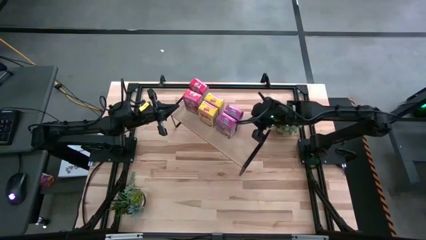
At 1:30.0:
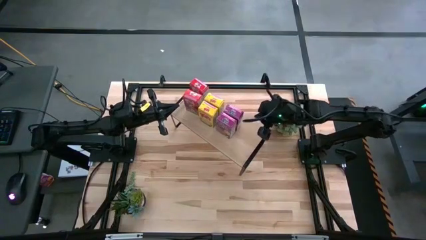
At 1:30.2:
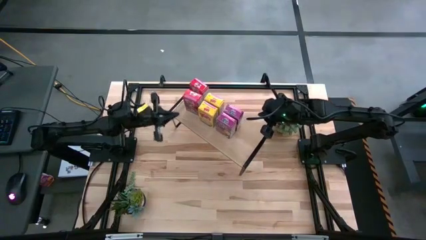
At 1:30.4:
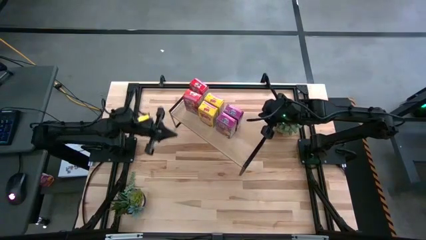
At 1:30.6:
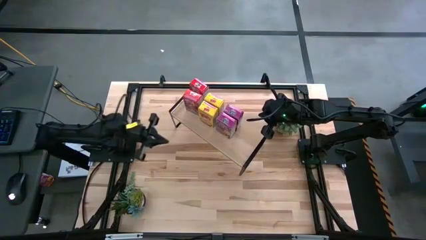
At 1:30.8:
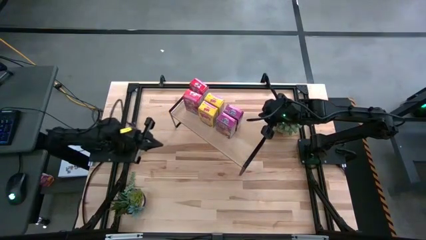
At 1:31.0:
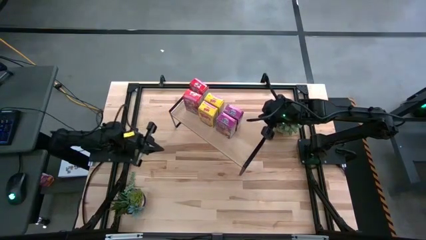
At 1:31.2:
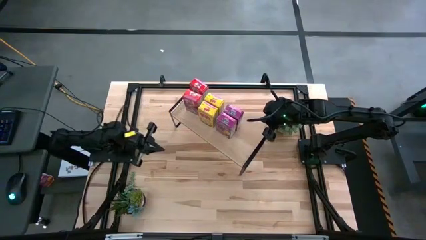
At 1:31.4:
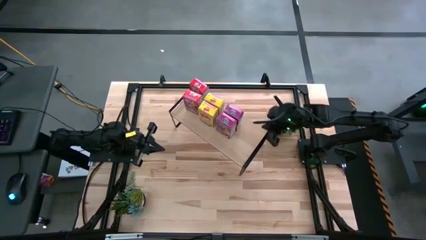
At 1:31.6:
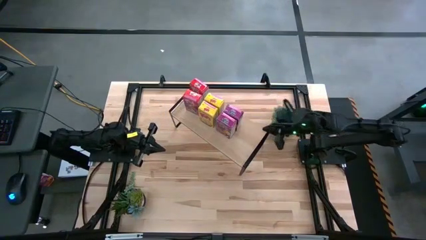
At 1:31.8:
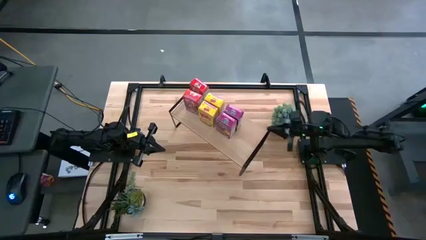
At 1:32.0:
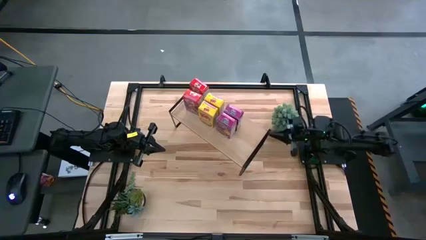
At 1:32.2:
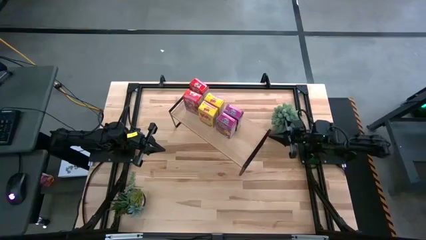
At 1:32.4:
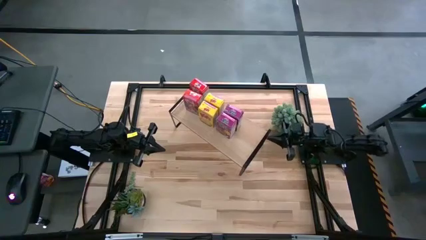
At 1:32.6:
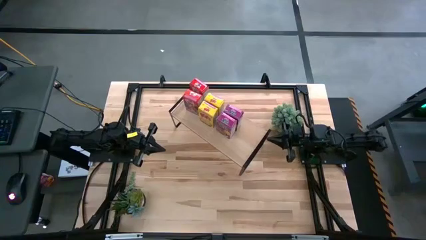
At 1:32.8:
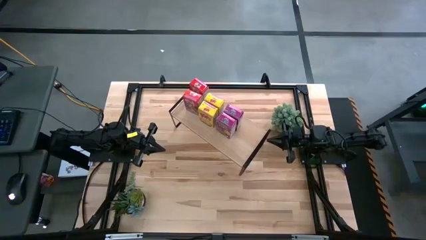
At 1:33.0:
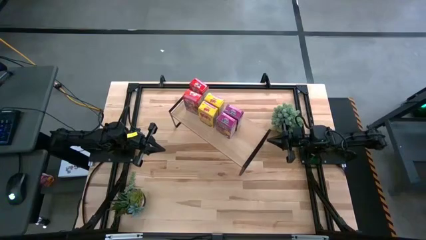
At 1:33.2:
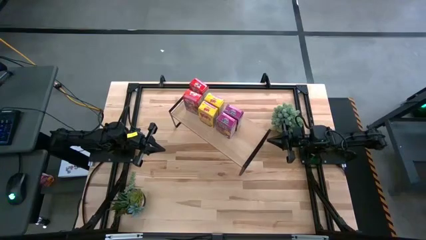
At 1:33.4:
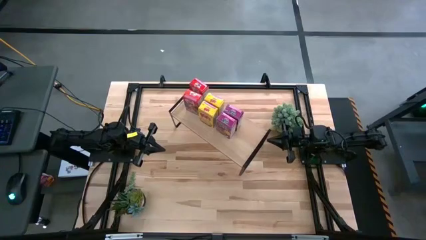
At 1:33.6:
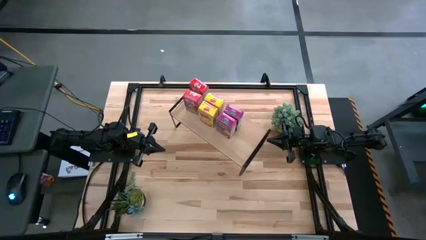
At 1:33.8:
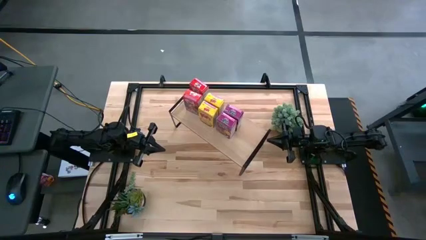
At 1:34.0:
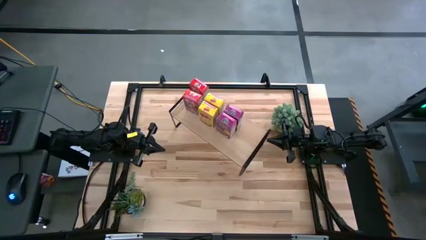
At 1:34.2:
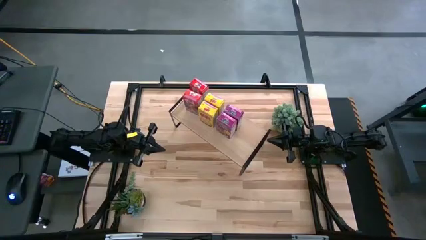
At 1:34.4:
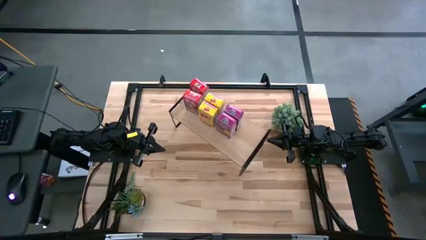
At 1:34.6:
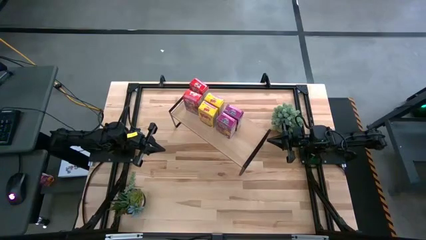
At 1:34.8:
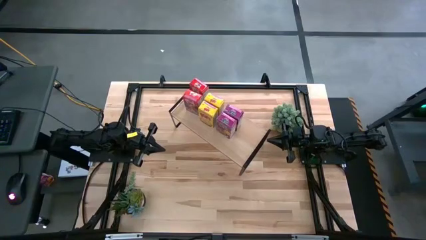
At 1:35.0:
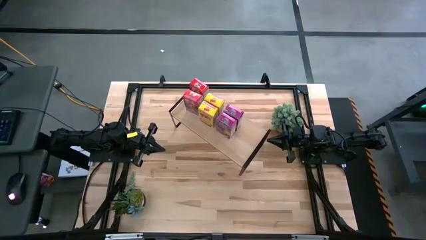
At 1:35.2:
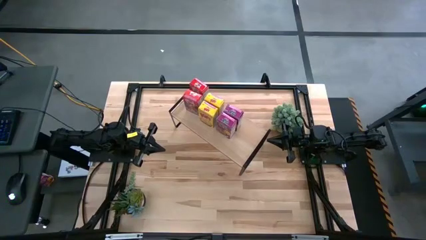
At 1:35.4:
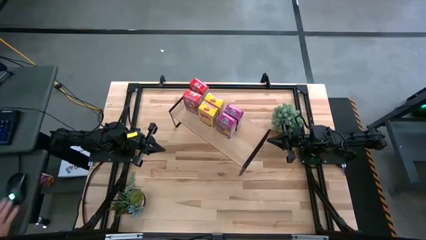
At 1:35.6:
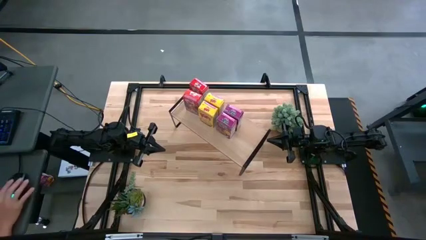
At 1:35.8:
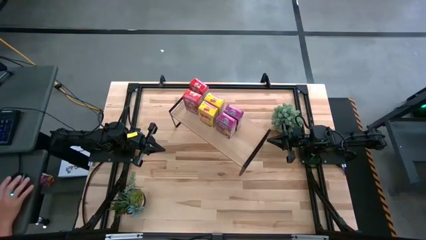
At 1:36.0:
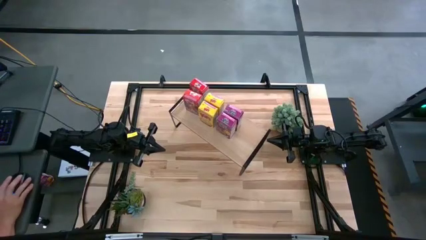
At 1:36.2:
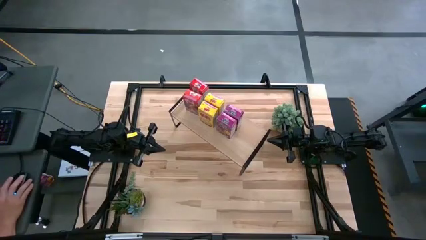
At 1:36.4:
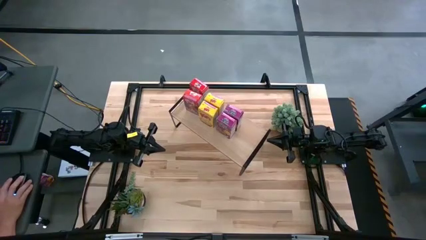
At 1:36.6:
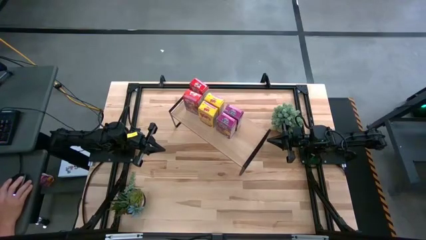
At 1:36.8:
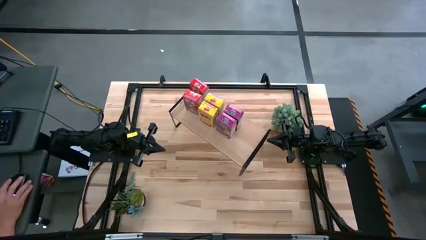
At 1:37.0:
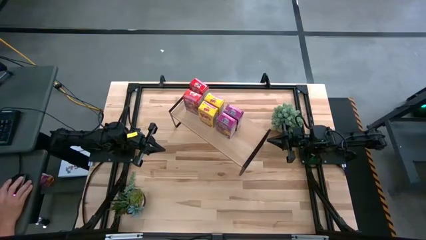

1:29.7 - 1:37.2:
Task: Stack cereal on shelf
Return to Home Position

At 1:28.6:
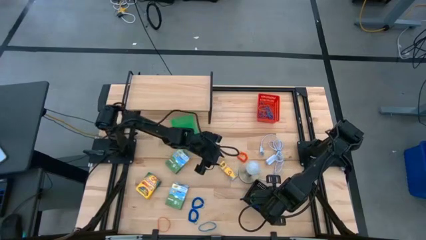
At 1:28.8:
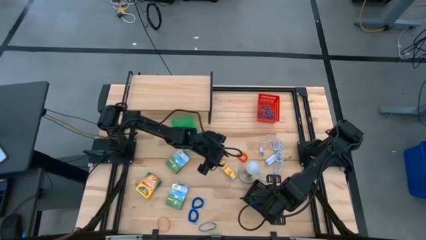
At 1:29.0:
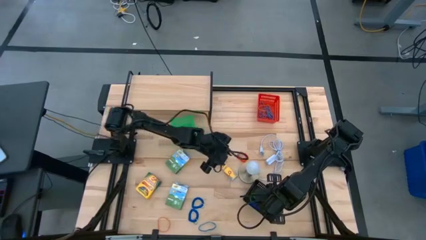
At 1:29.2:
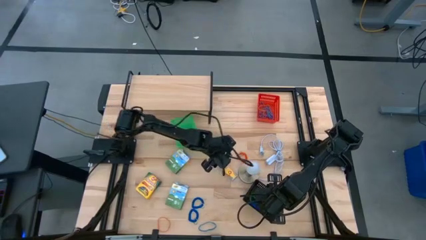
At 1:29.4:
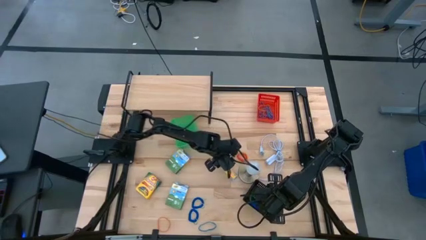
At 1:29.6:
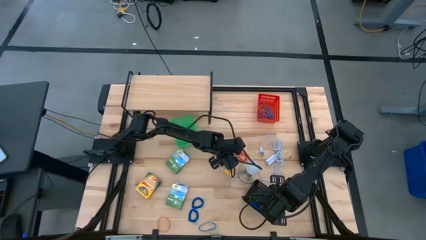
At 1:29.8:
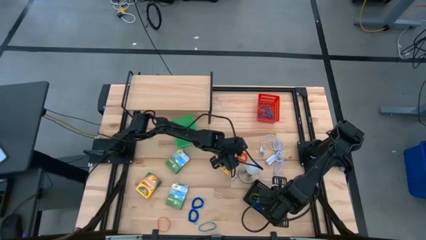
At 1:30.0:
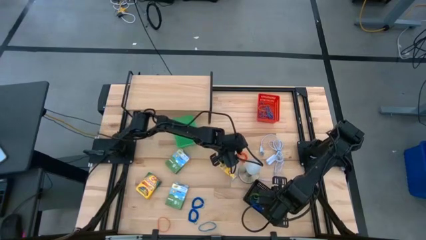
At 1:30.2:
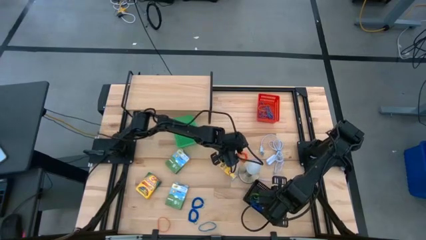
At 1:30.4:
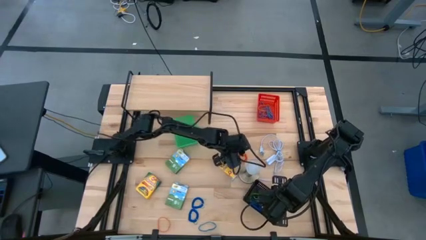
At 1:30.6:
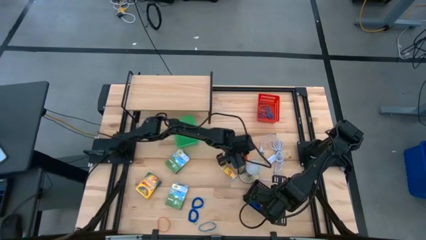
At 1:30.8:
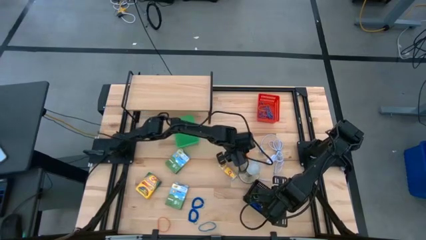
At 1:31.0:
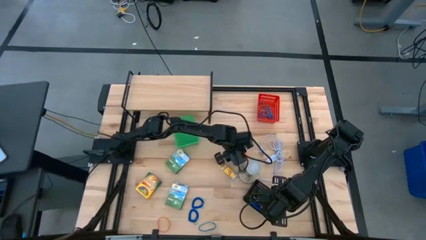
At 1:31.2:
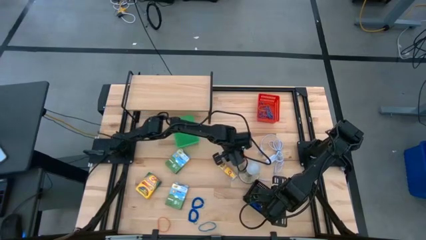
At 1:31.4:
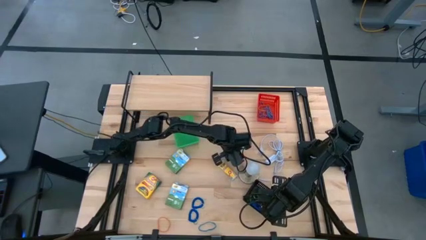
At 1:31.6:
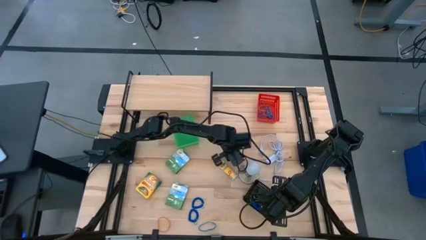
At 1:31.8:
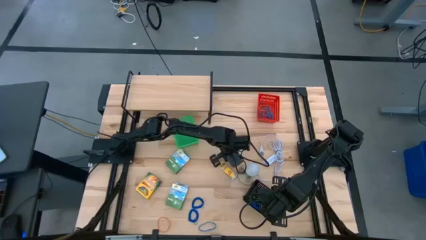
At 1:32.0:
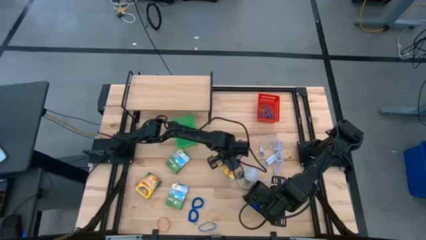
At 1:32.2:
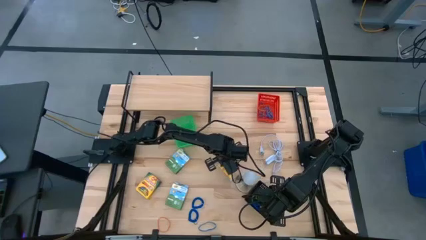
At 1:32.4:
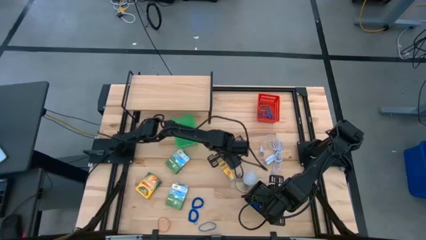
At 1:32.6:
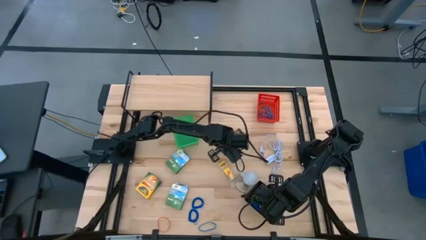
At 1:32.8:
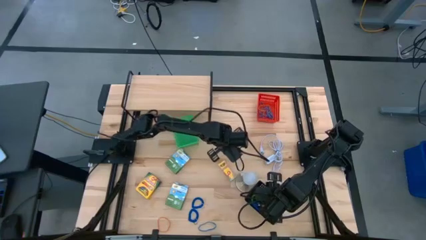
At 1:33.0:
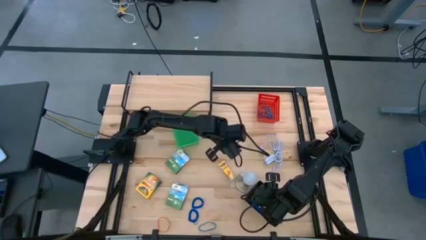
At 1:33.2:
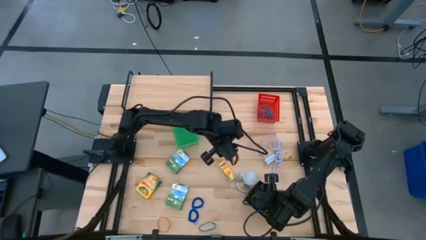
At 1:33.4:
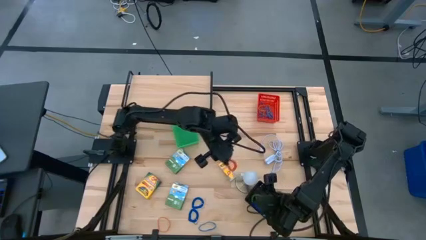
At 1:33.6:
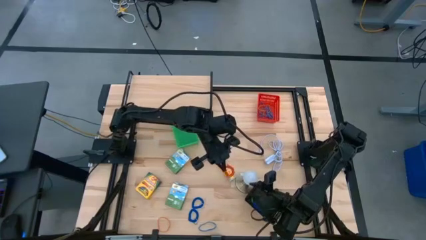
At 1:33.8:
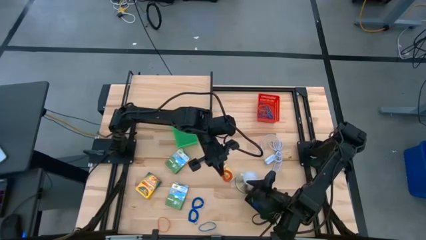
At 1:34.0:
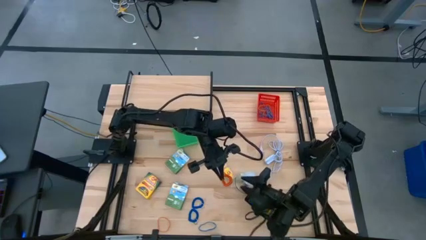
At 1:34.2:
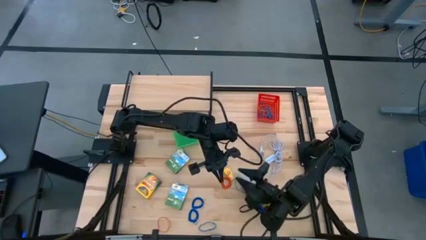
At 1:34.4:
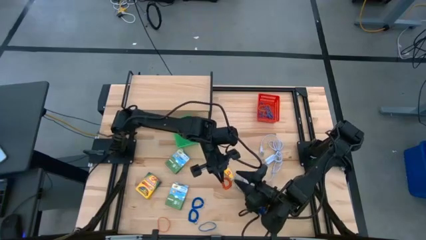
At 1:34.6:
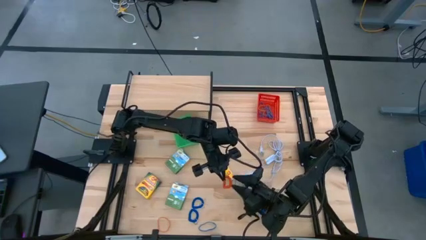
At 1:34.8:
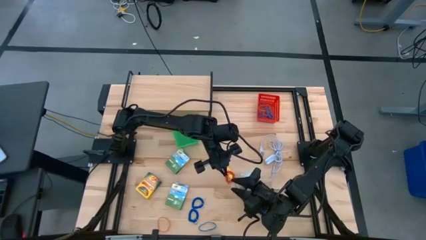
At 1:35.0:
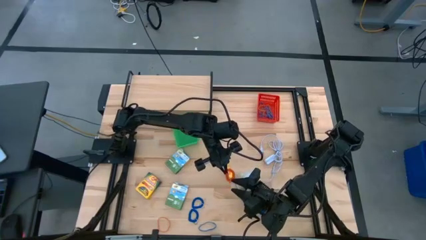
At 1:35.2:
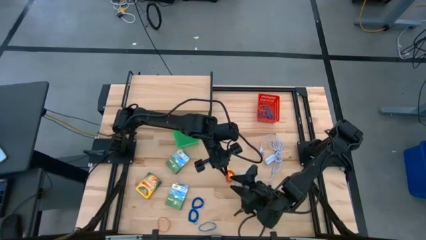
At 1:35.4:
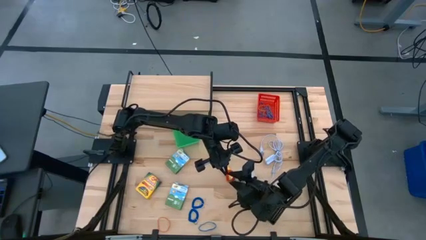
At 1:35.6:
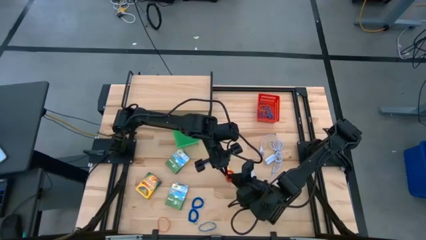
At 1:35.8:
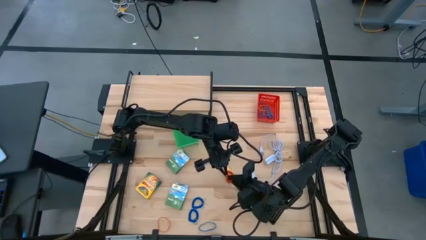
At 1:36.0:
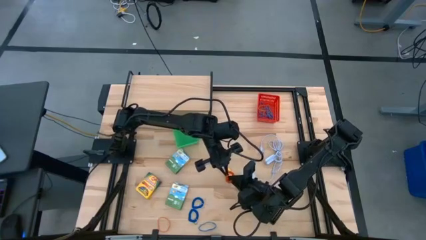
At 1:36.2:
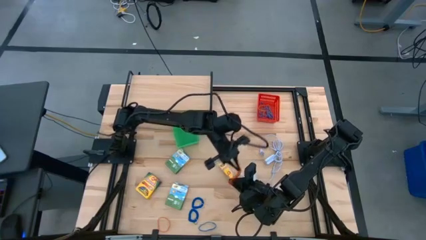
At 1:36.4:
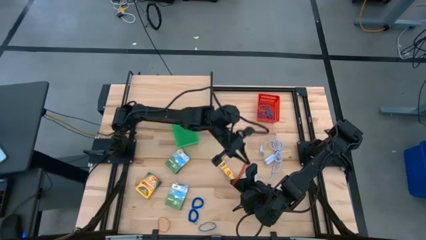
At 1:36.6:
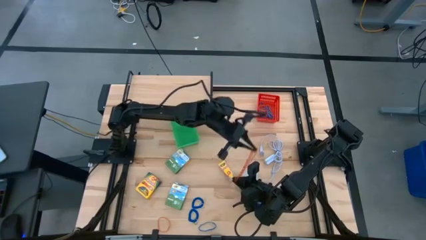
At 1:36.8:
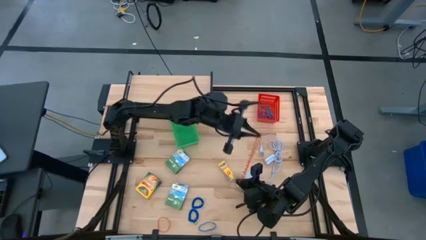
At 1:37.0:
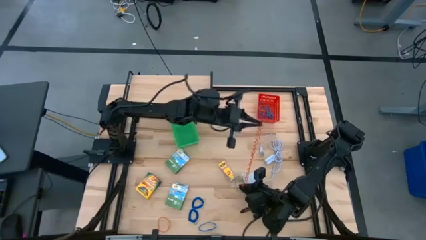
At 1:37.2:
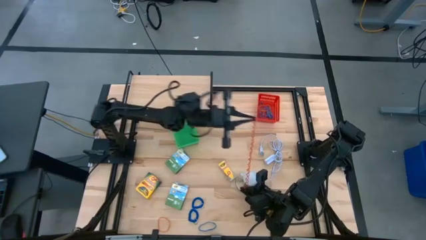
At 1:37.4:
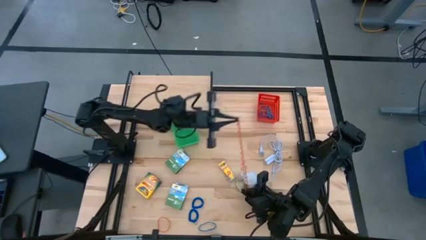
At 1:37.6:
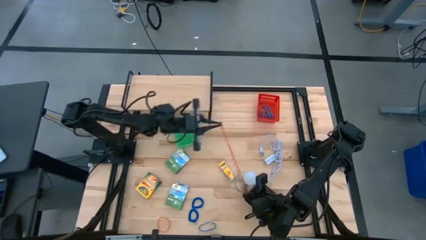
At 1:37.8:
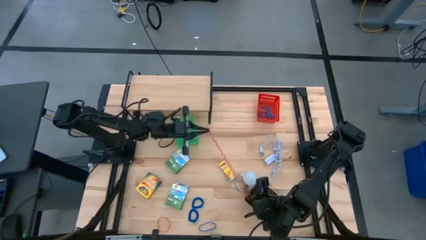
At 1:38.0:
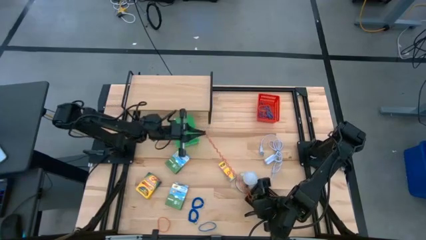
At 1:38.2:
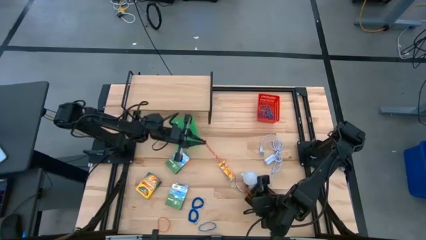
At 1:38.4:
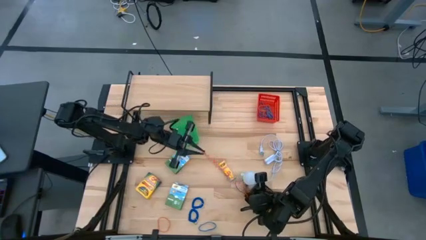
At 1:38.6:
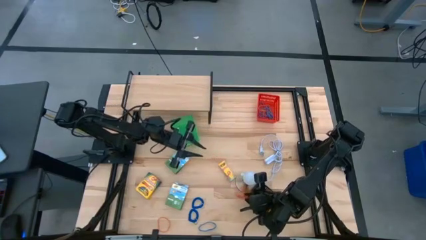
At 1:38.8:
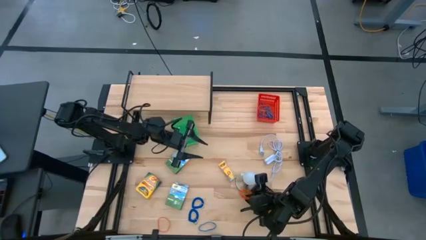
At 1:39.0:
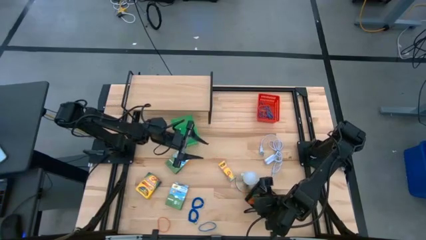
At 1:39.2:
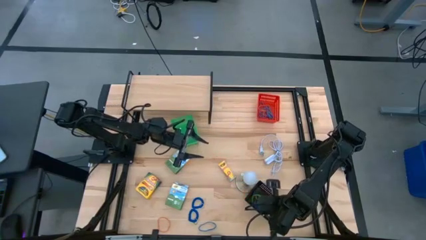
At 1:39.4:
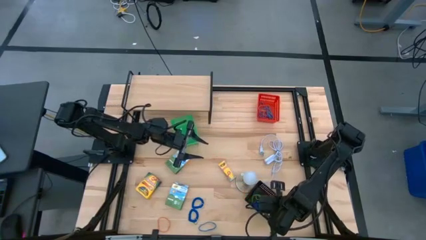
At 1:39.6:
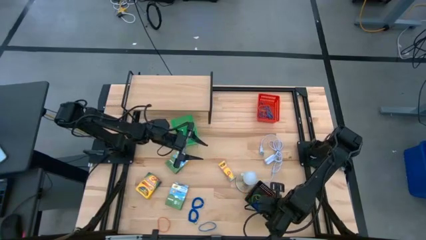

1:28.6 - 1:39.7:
Task: Pick & Place Office Desk Supplies
Put the orange spring keychain into the black basket
